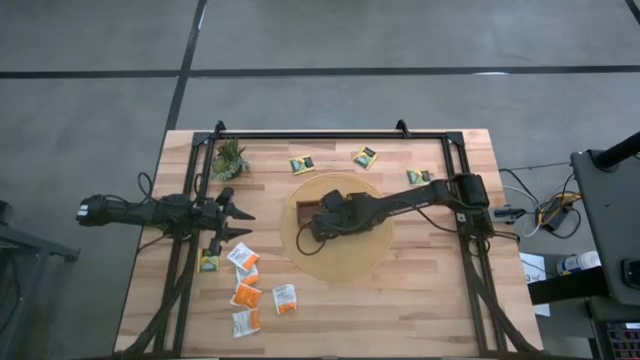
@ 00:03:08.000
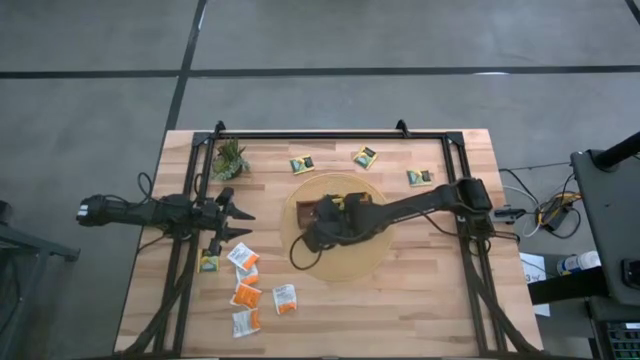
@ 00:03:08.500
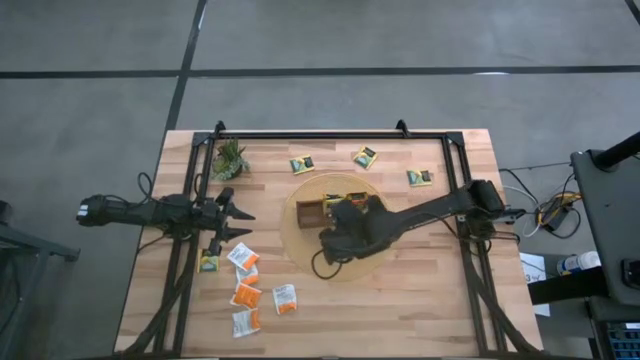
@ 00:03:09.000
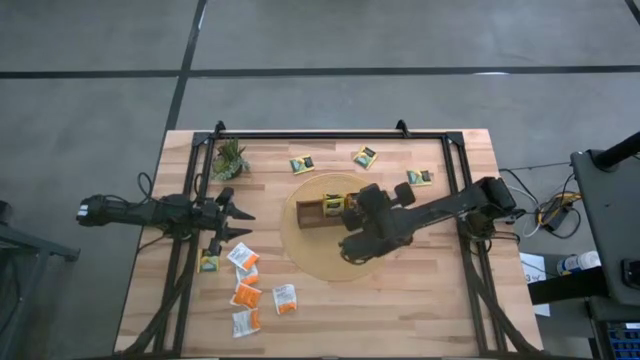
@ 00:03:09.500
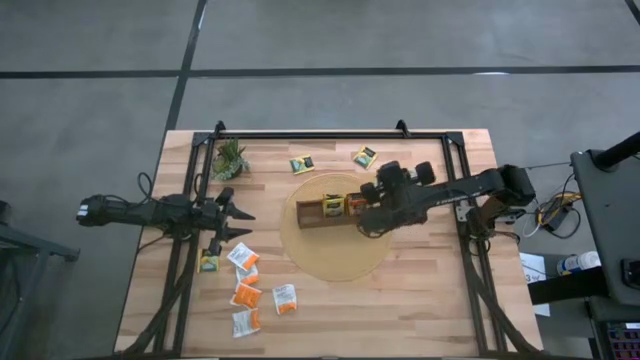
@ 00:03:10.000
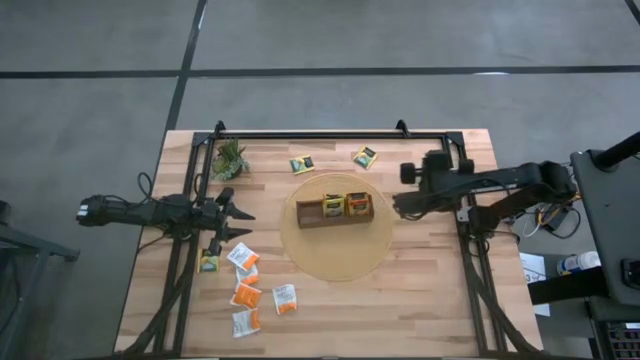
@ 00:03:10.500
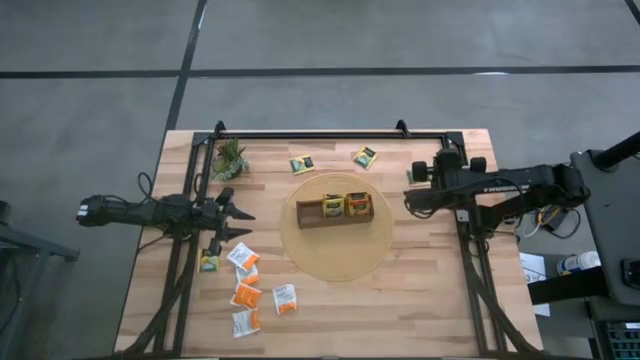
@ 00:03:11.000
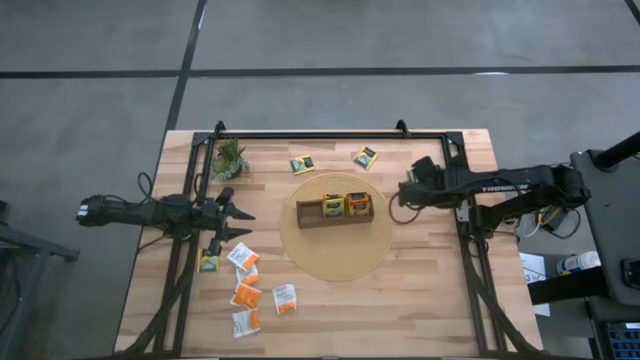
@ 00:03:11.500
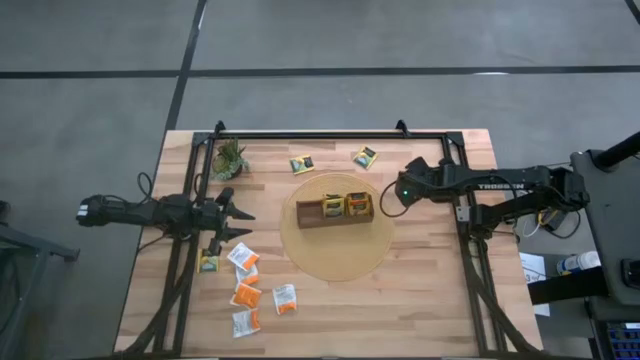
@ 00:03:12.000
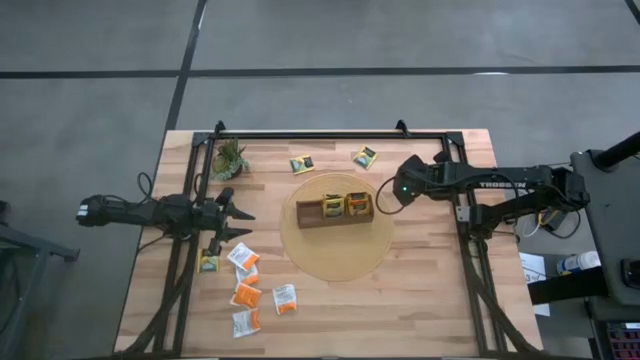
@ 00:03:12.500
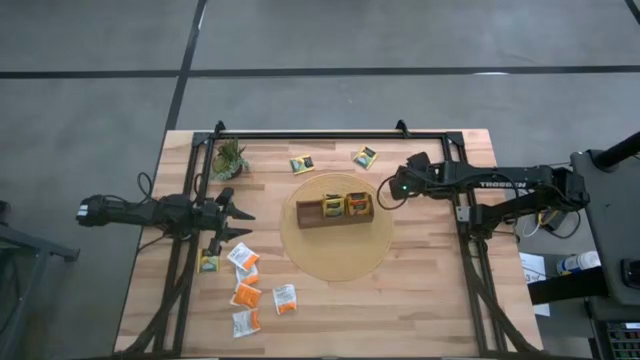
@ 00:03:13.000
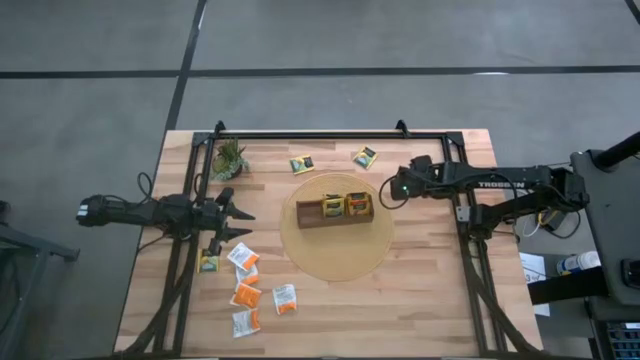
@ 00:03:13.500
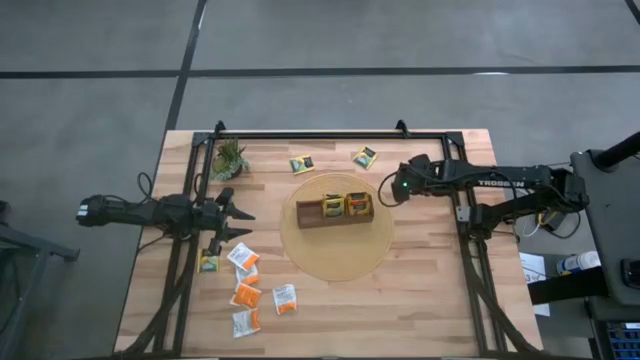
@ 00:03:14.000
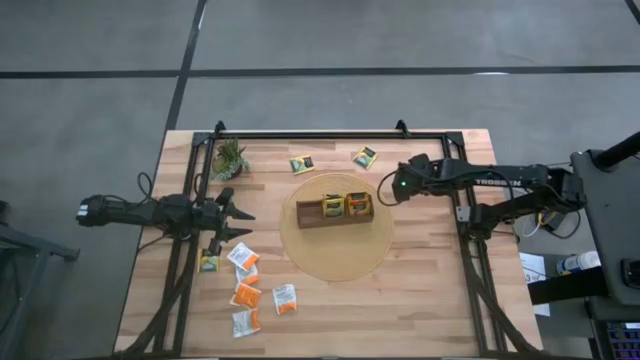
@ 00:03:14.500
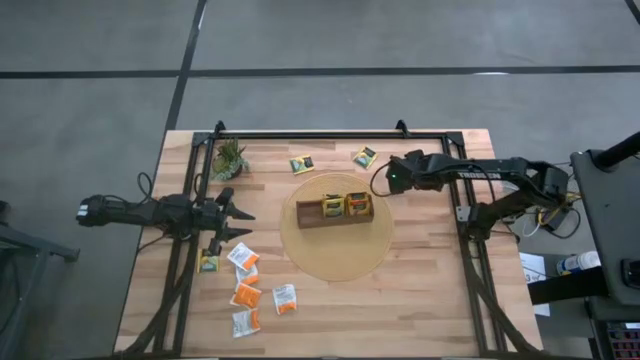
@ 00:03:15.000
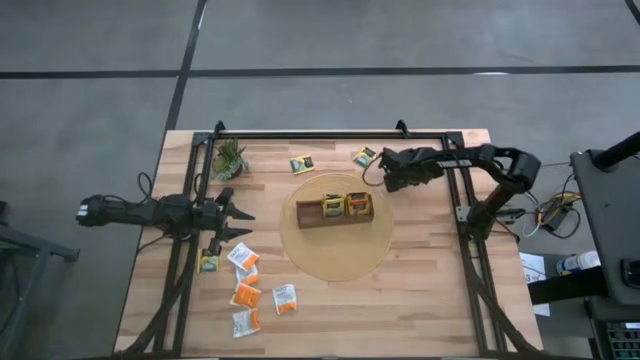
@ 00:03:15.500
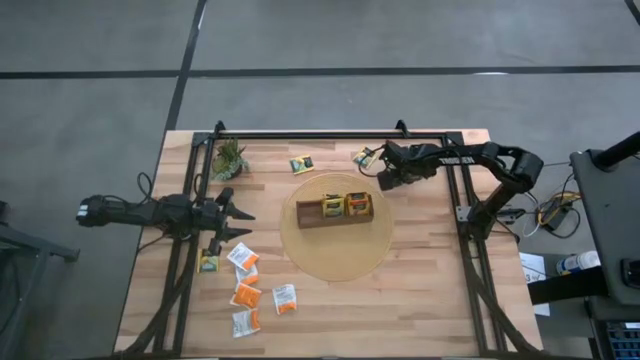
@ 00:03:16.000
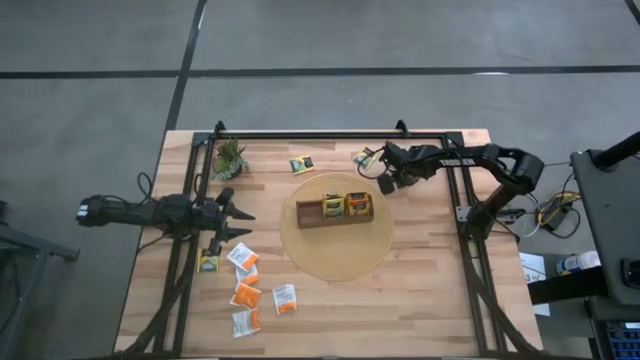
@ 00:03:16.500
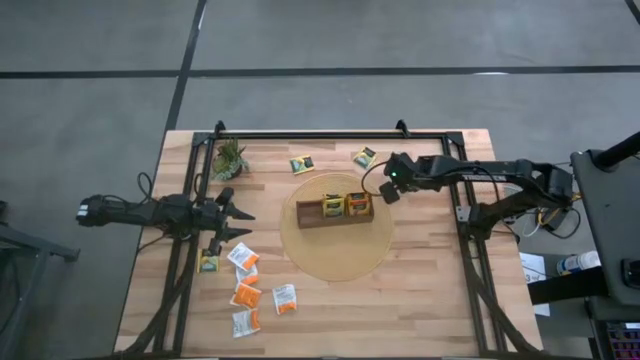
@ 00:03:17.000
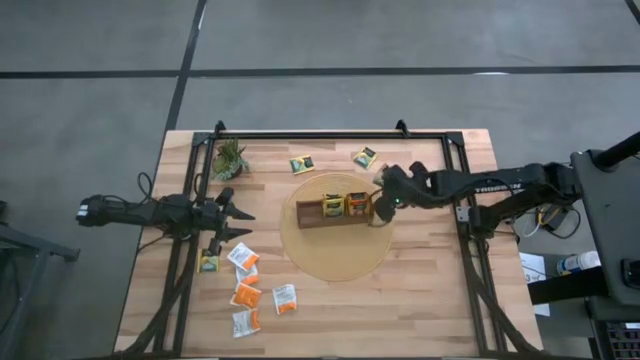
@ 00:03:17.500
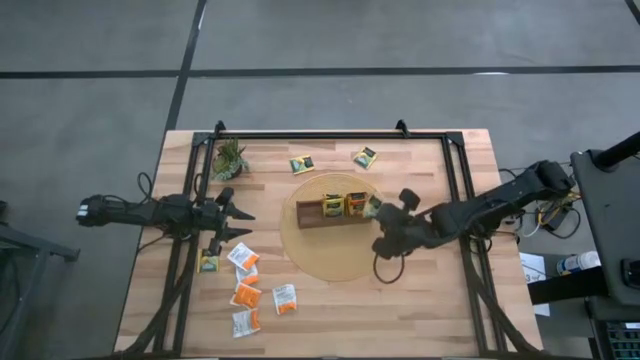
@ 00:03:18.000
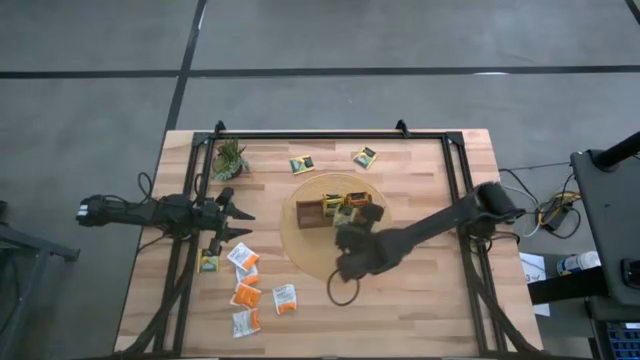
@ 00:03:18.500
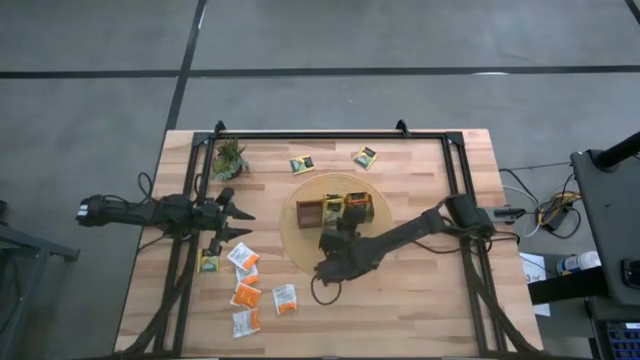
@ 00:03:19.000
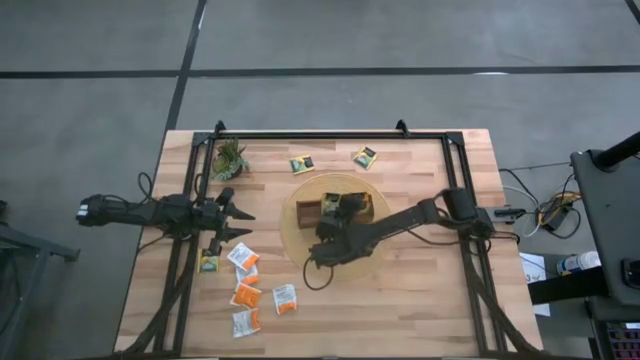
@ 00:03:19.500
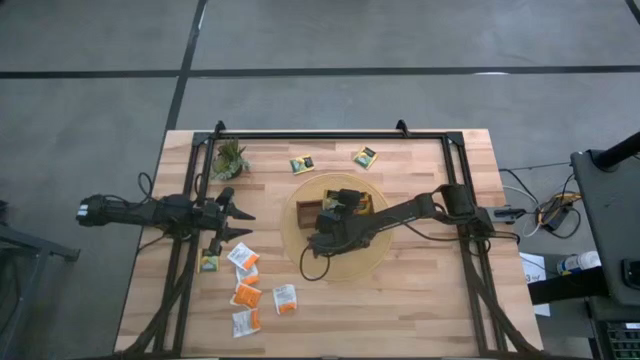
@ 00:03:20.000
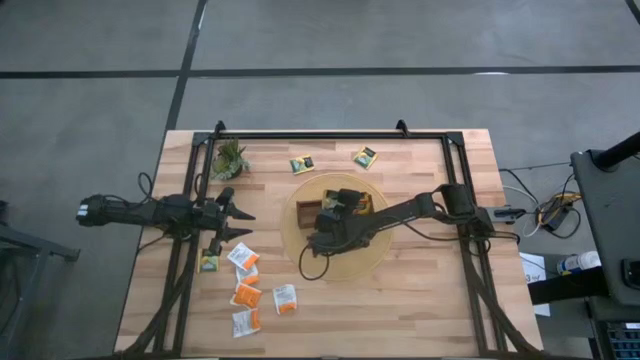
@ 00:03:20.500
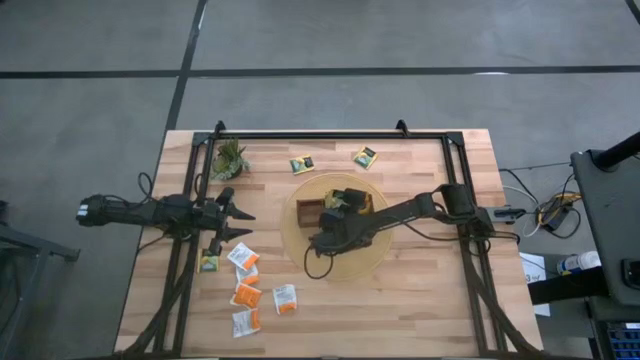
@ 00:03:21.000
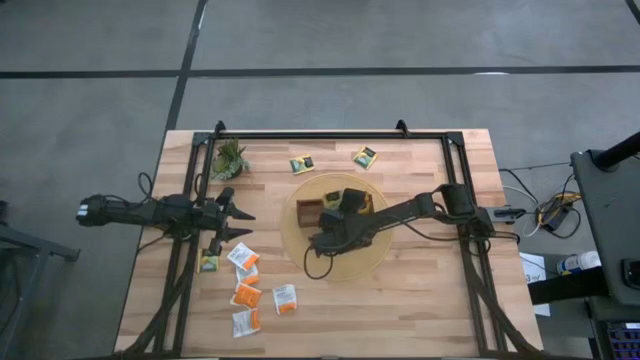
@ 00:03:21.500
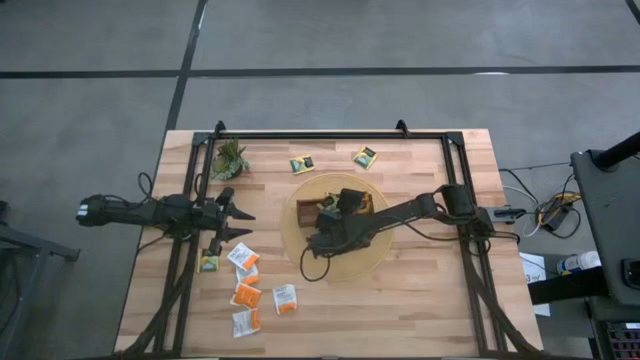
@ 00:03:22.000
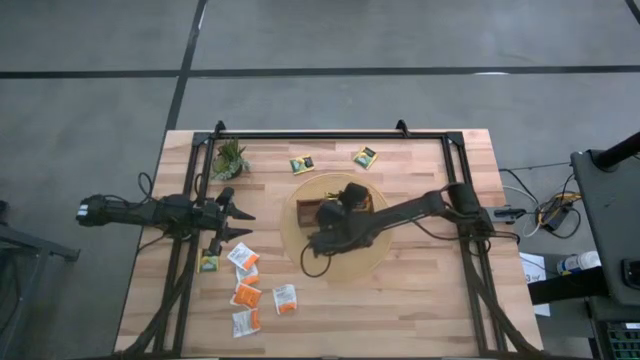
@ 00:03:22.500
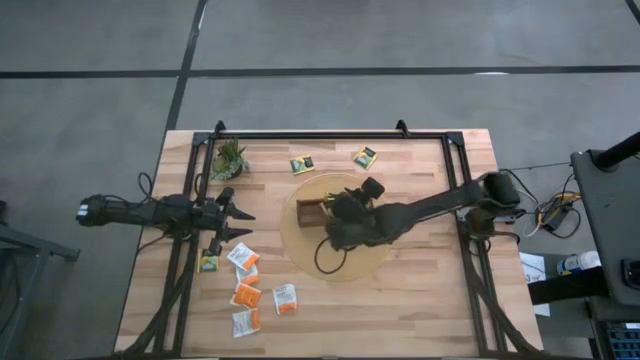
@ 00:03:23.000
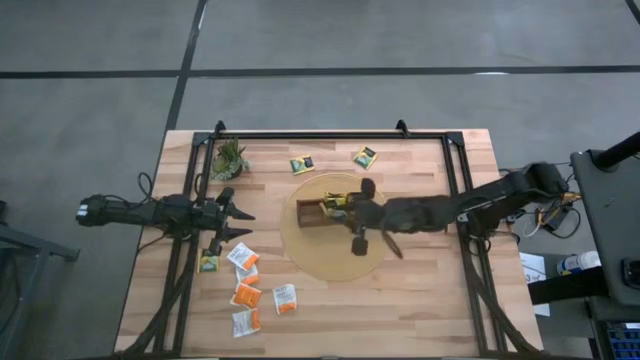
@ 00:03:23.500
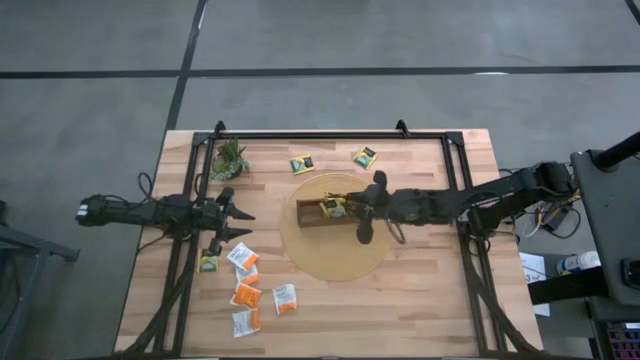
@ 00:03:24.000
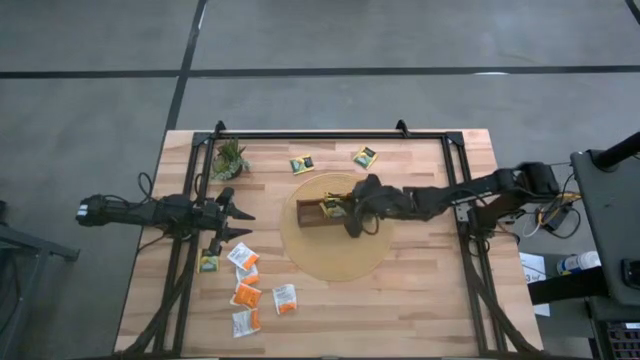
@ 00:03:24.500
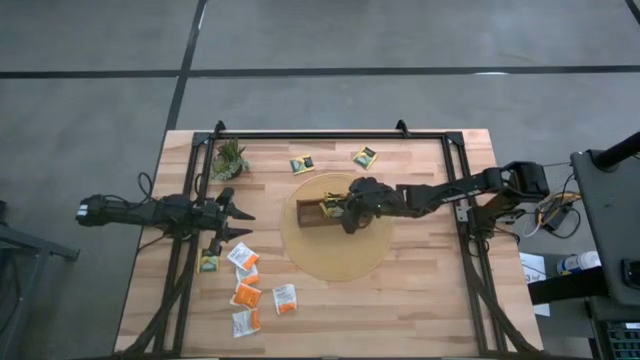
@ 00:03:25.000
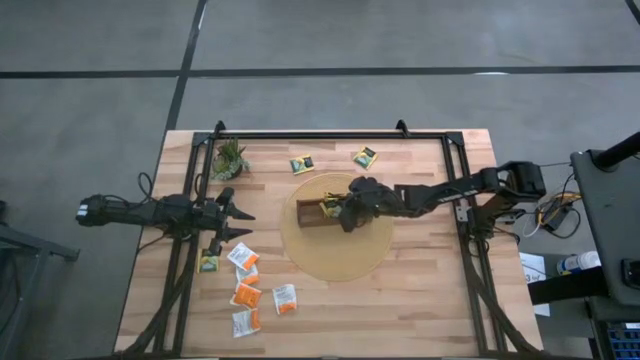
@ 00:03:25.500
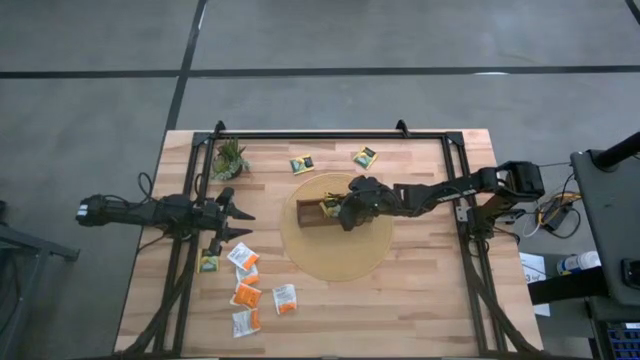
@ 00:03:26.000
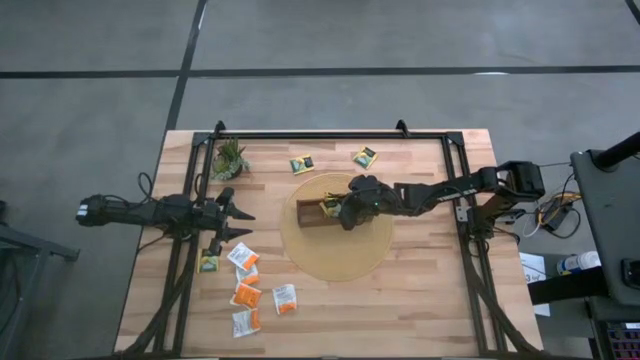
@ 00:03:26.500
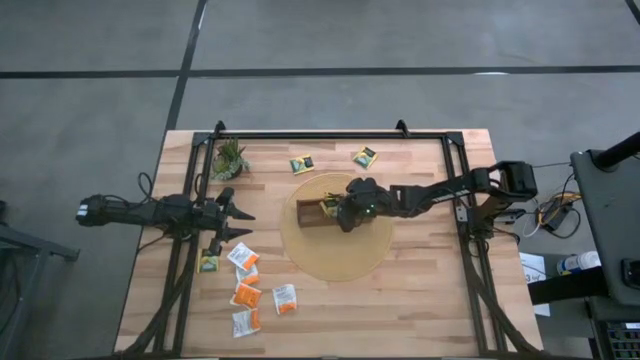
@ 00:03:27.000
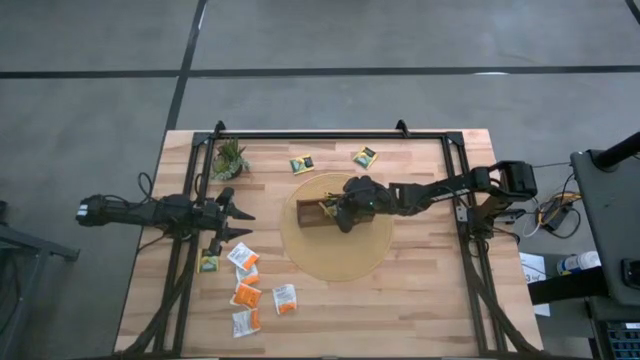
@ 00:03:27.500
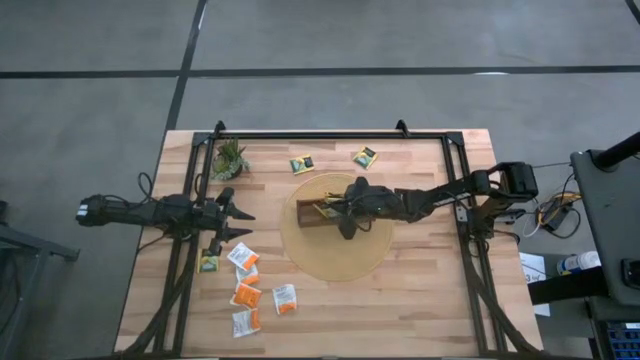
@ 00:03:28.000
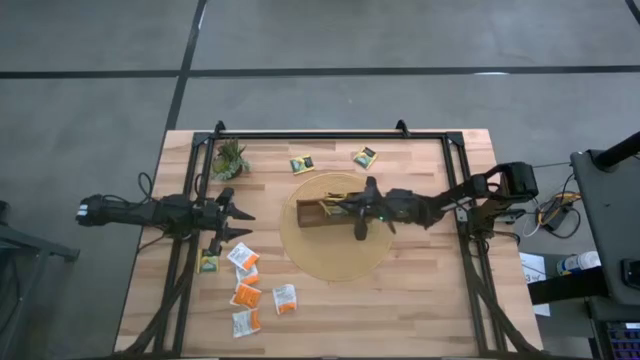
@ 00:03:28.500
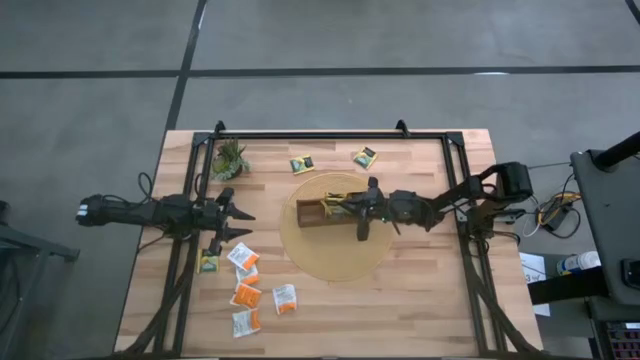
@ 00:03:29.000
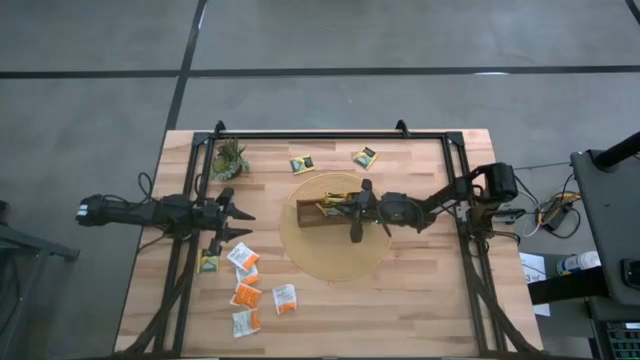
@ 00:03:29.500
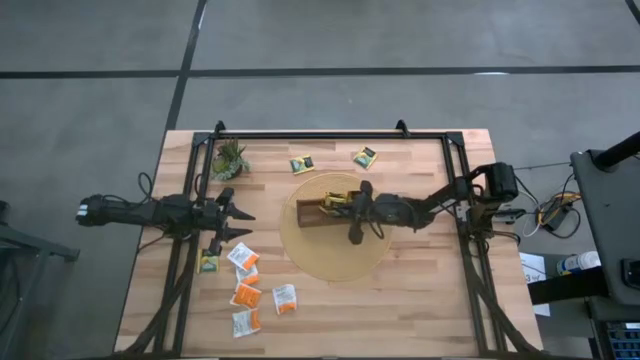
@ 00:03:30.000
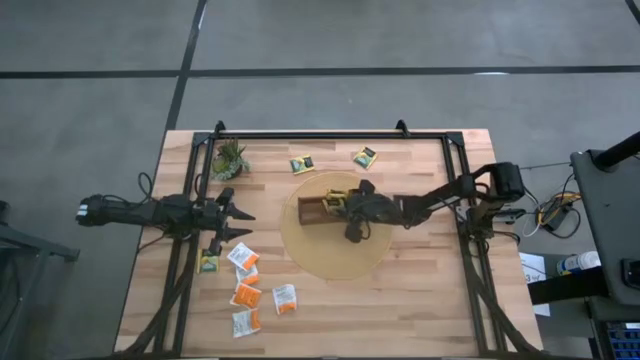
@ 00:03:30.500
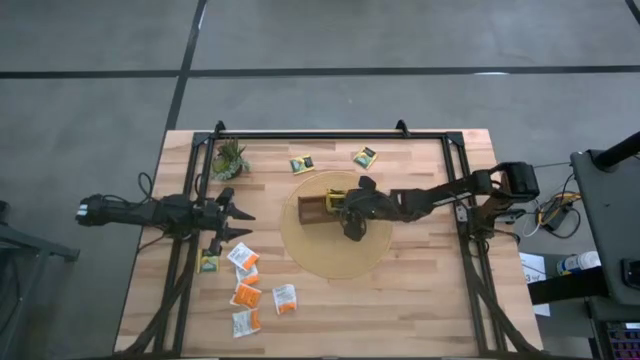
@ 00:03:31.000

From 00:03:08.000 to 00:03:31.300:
Task: Pick & Place Tea
Put the yellow tea bag into the middle section of the wooden organizer
